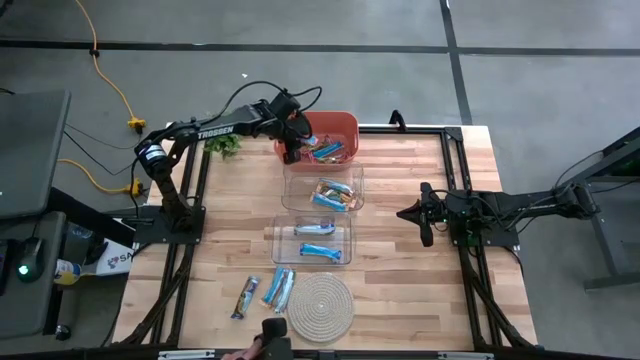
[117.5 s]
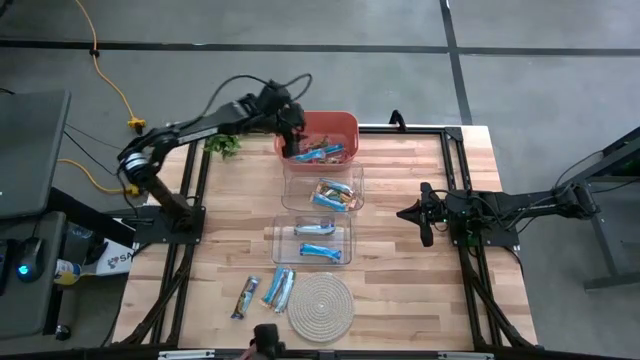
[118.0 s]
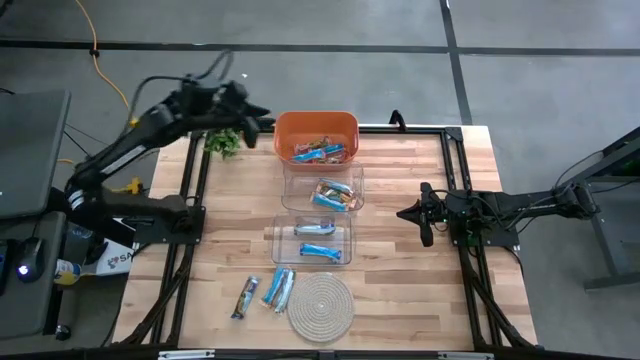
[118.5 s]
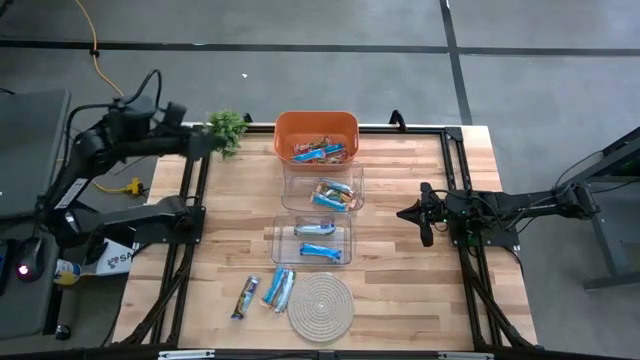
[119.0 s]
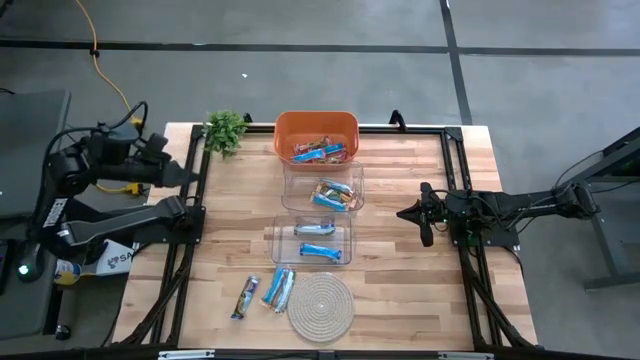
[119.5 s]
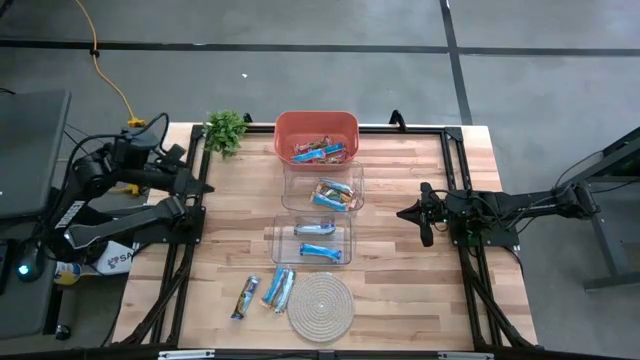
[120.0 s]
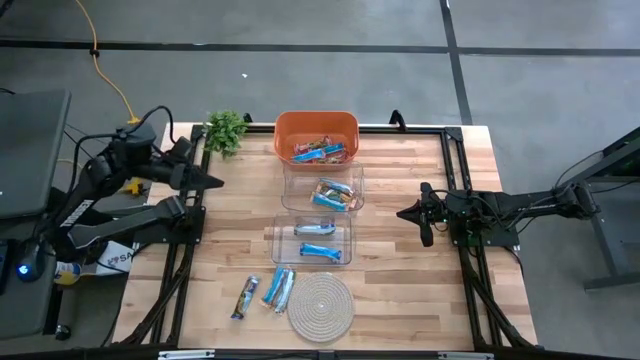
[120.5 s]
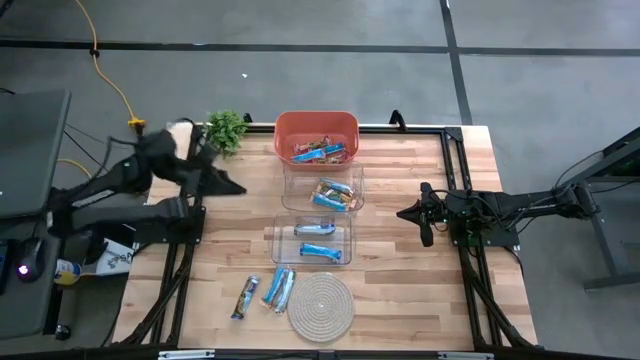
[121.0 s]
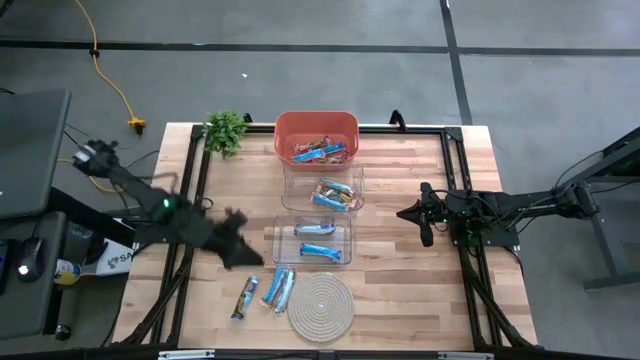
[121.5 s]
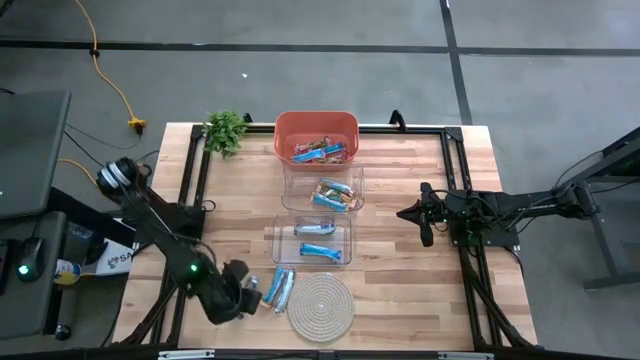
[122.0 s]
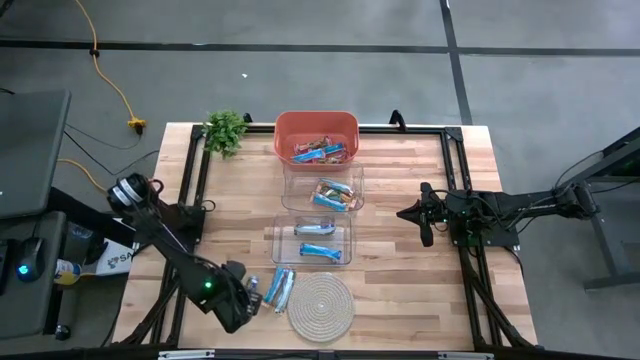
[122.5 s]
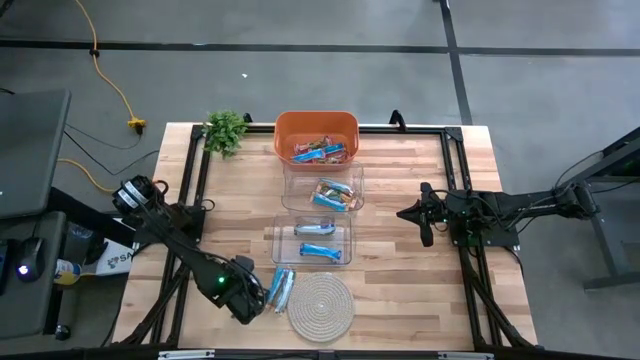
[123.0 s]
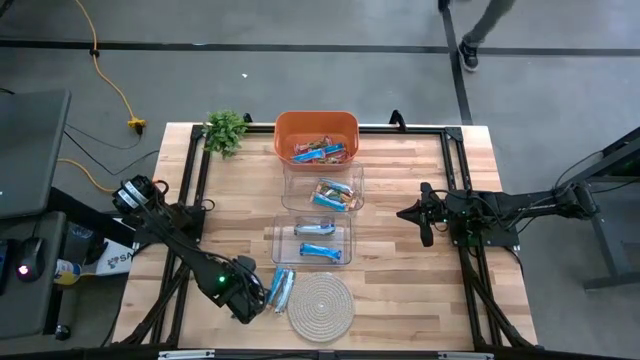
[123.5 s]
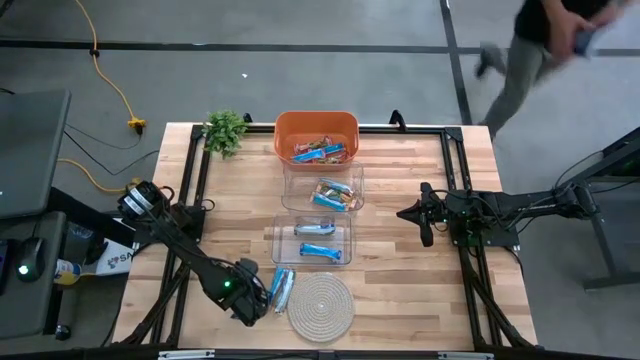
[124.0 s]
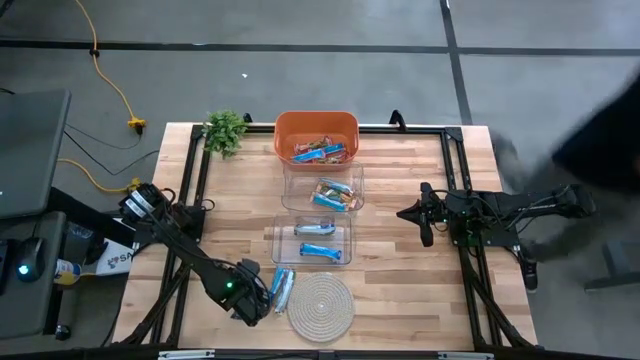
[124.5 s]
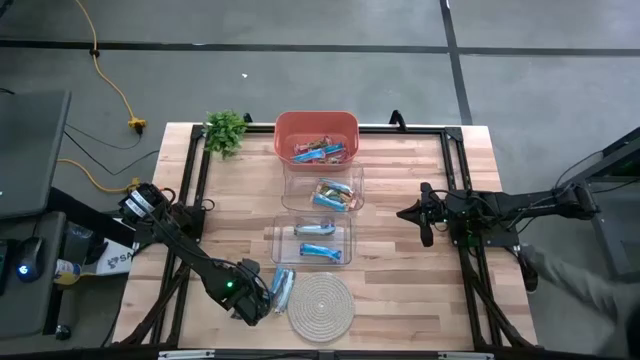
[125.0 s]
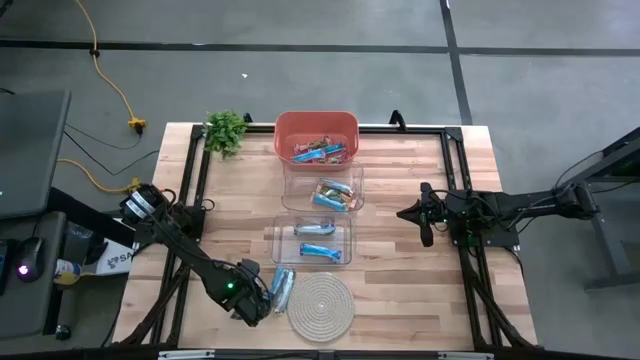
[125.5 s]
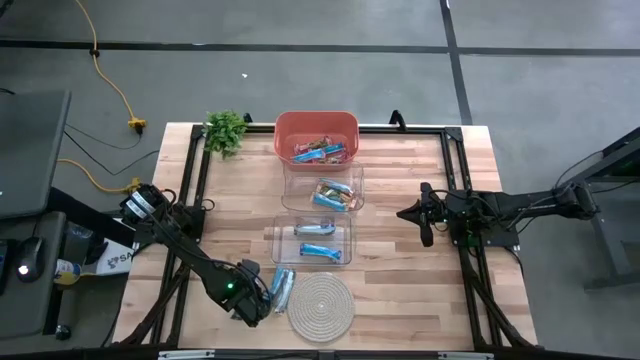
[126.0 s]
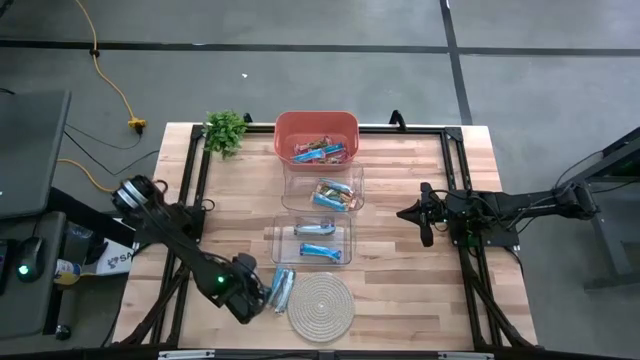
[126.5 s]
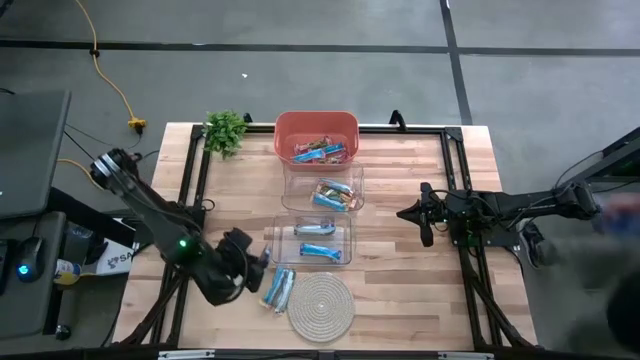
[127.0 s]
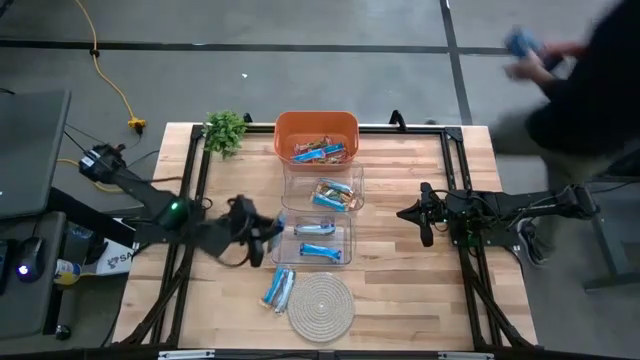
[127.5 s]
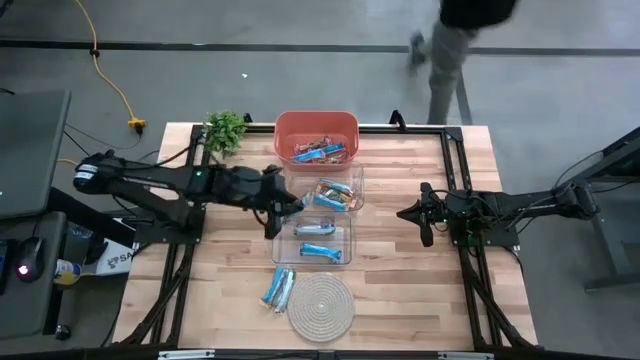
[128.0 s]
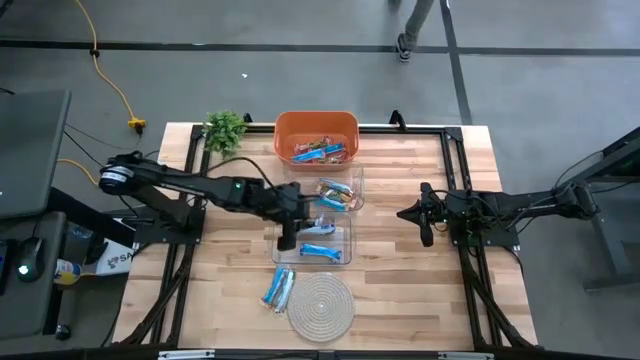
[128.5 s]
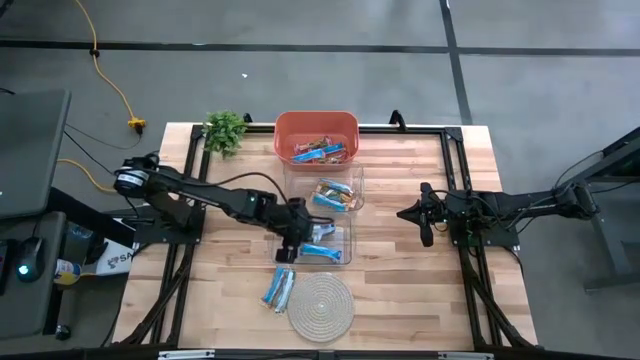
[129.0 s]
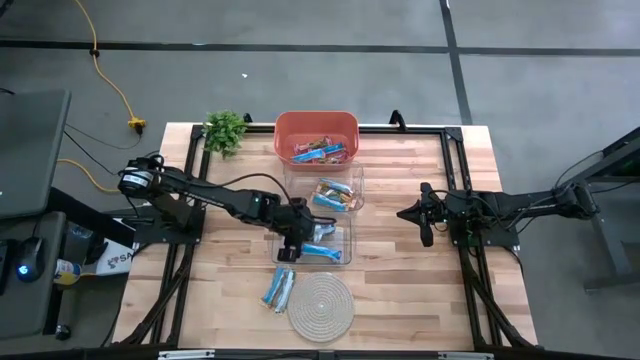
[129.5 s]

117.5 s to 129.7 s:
Task: Pick and place Granola Bars by type
Put the blue granola bar into the bottom transparent bin

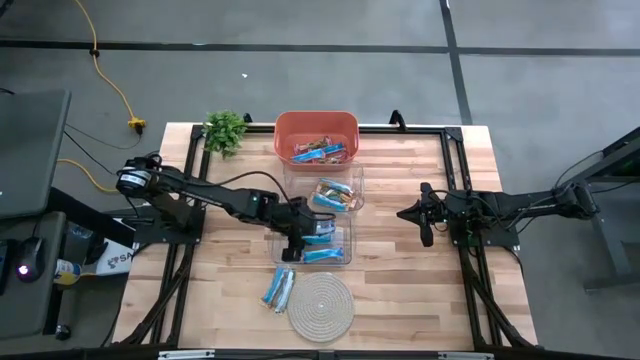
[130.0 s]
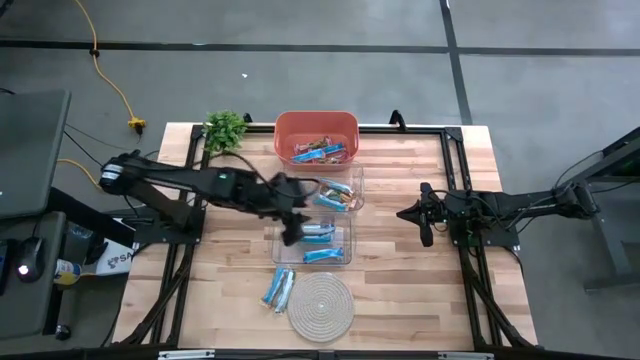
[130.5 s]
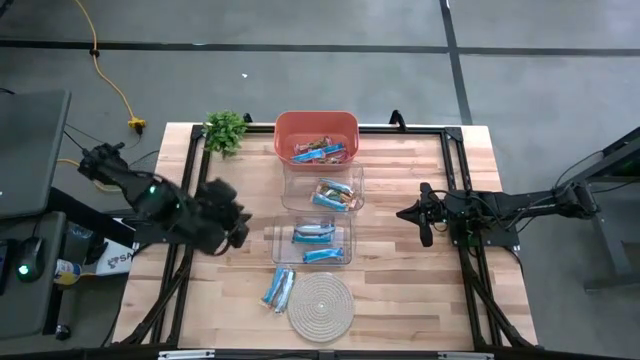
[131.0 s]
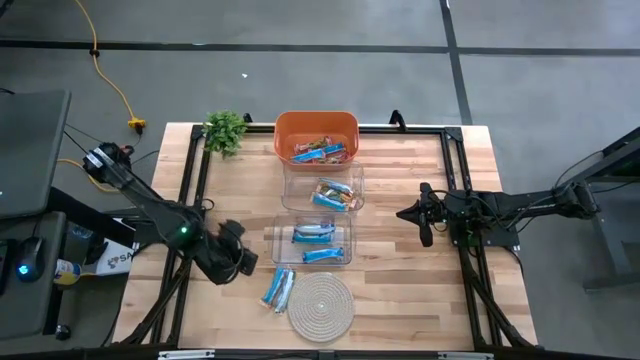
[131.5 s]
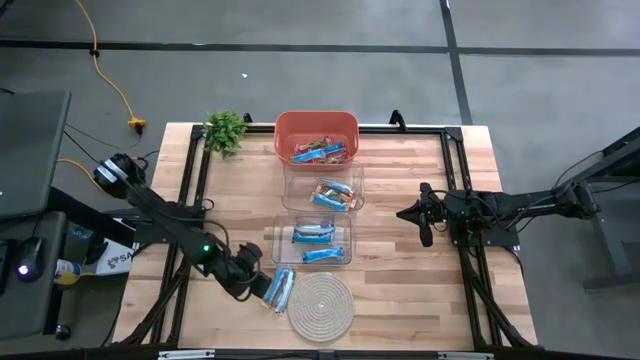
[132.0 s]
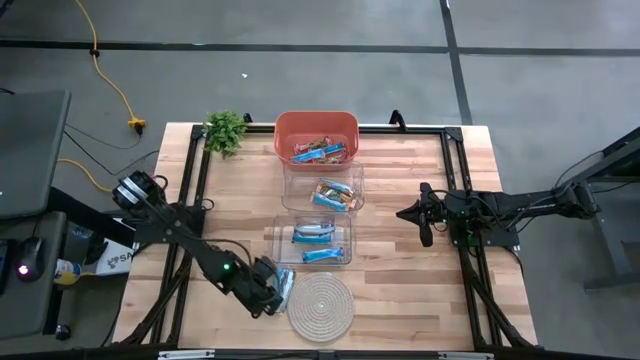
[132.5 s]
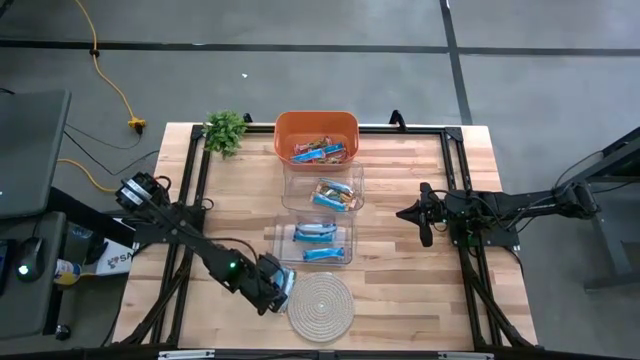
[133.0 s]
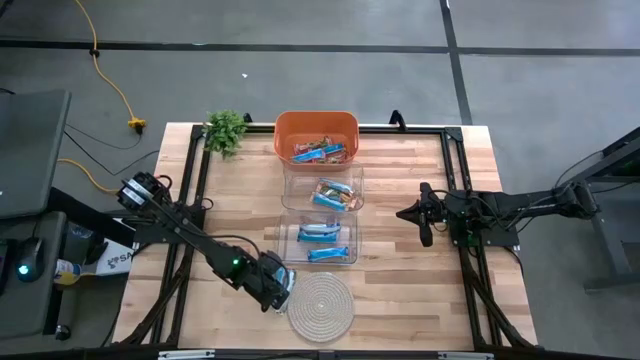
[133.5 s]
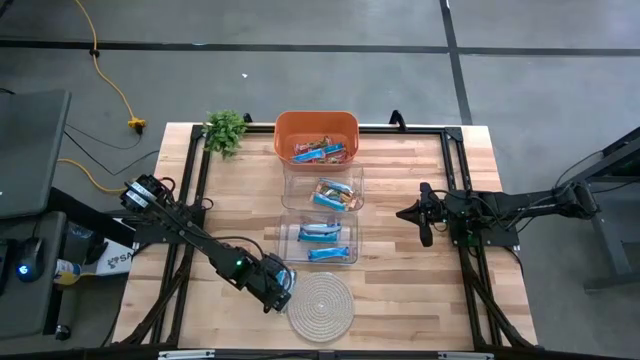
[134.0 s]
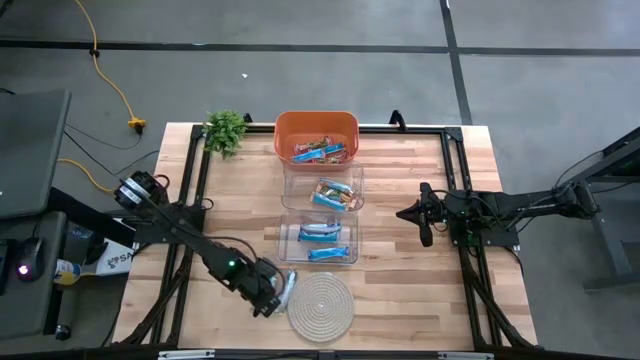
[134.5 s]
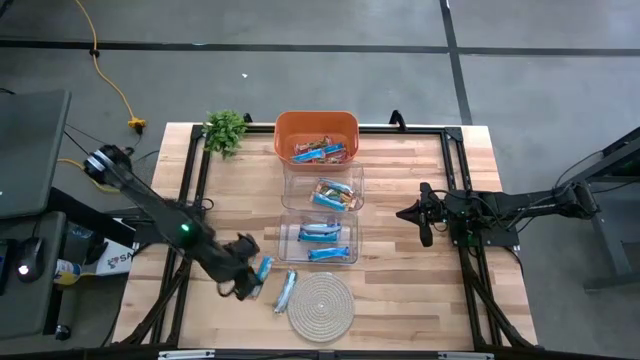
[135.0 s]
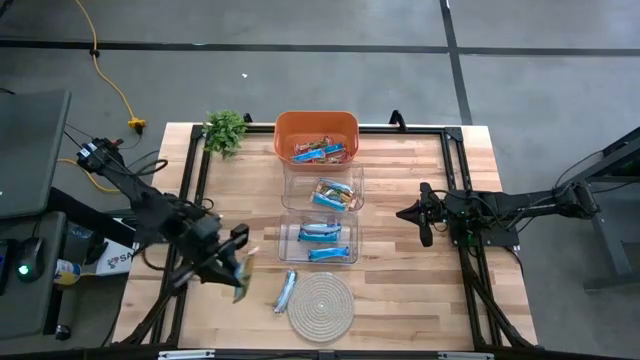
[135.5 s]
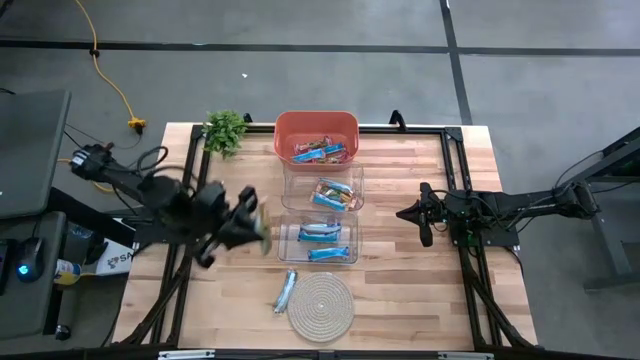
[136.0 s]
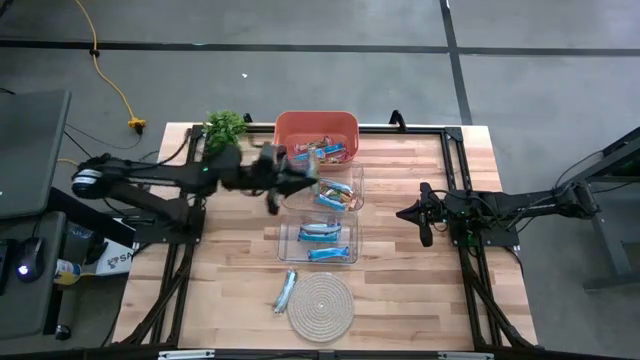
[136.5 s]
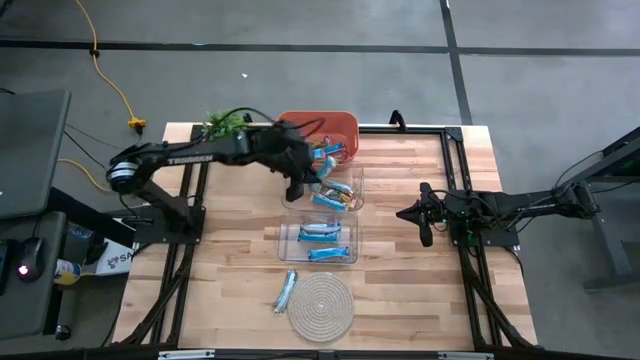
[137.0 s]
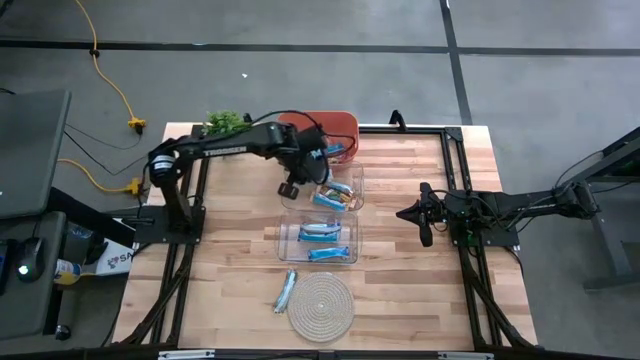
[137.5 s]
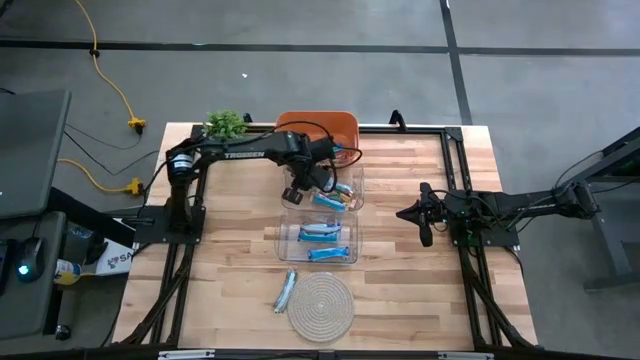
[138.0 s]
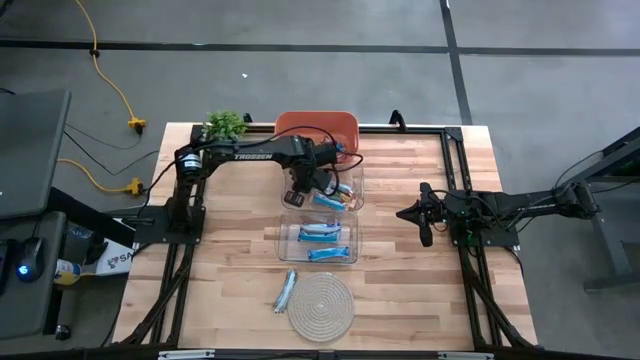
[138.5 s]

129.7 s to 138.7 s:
Put the yellow granola bar into the top transparent bin
